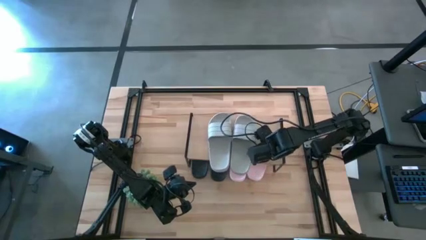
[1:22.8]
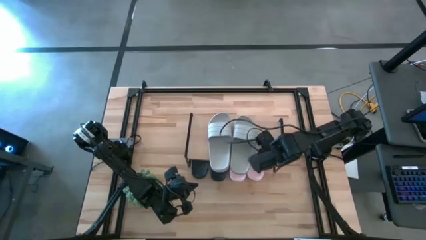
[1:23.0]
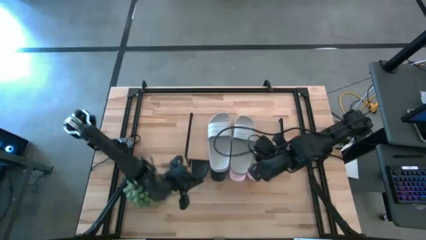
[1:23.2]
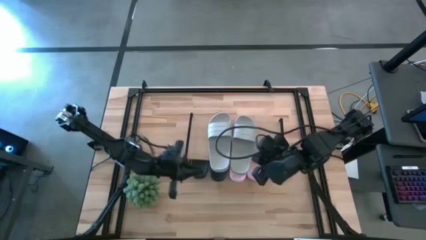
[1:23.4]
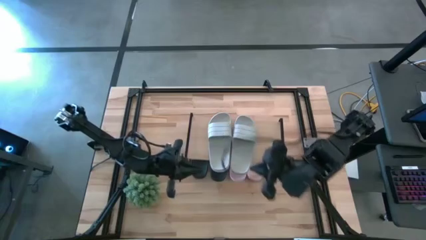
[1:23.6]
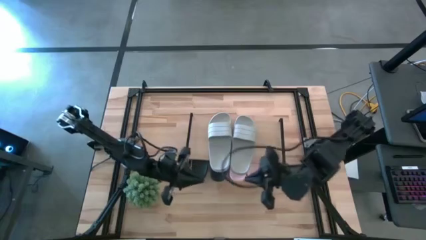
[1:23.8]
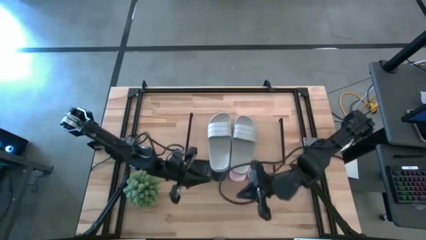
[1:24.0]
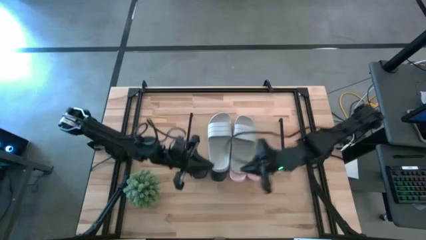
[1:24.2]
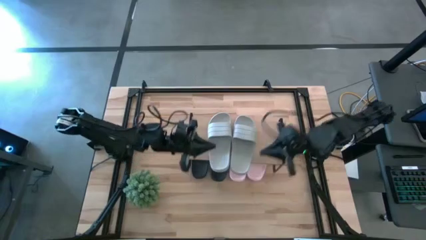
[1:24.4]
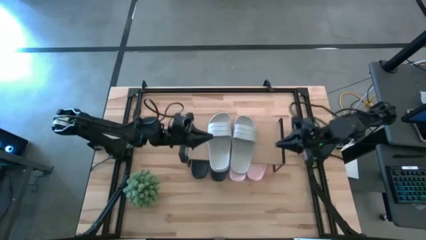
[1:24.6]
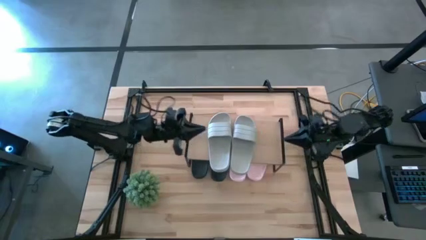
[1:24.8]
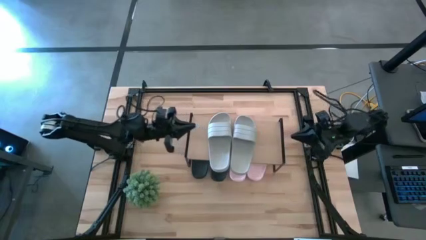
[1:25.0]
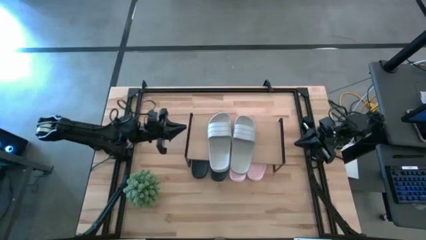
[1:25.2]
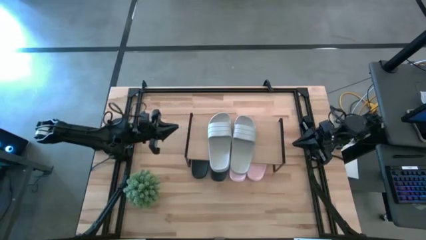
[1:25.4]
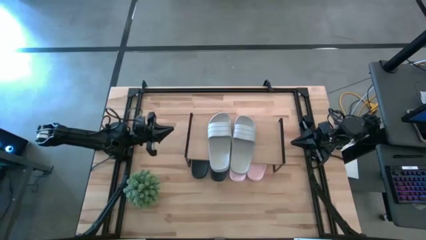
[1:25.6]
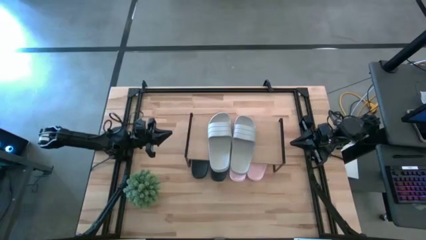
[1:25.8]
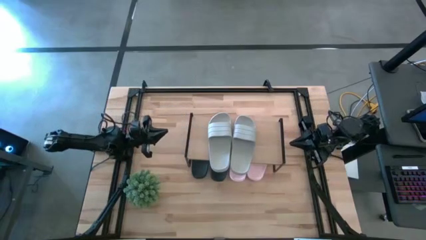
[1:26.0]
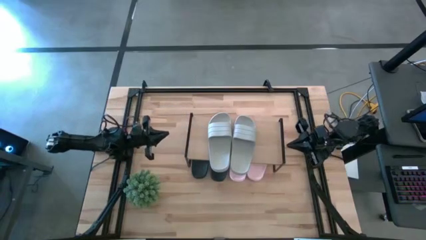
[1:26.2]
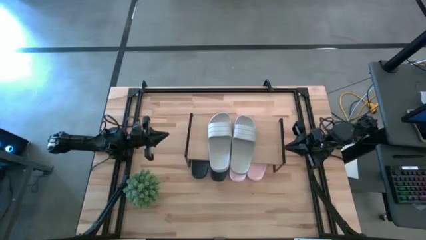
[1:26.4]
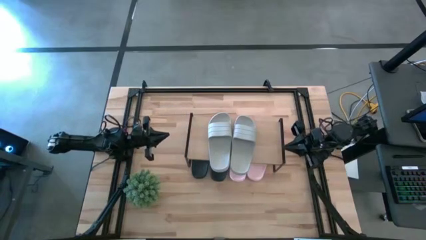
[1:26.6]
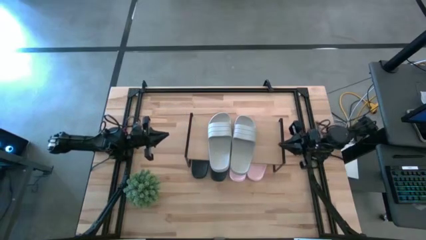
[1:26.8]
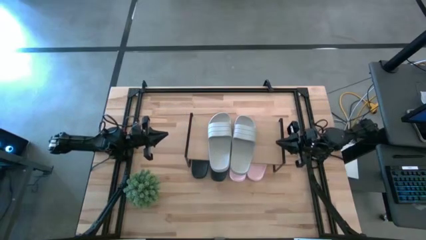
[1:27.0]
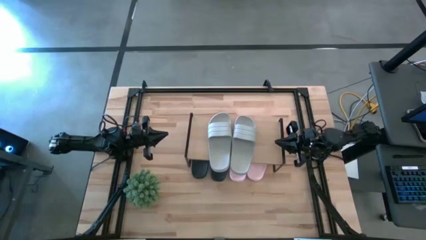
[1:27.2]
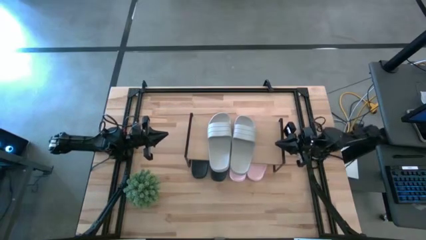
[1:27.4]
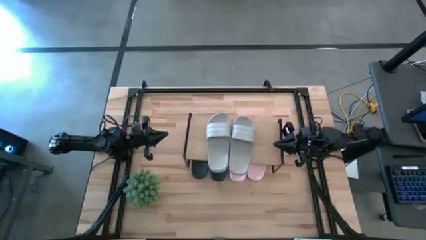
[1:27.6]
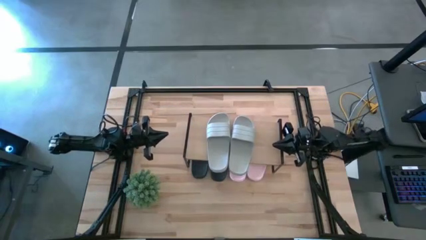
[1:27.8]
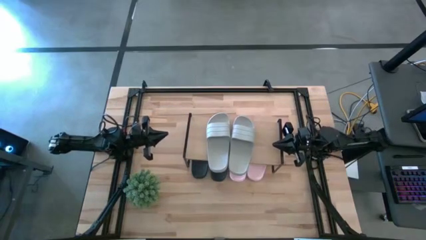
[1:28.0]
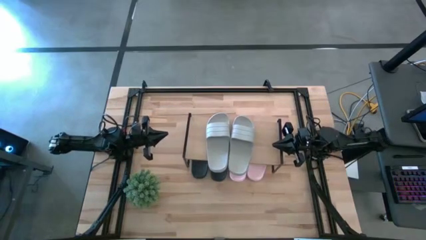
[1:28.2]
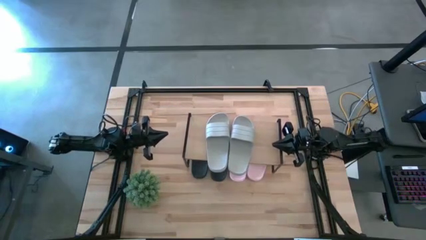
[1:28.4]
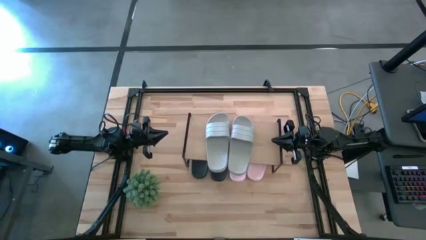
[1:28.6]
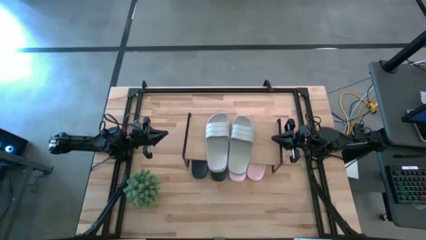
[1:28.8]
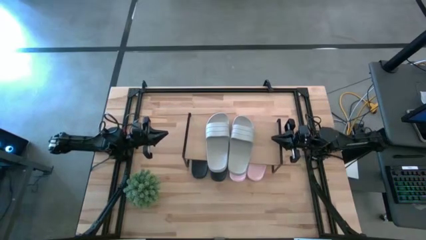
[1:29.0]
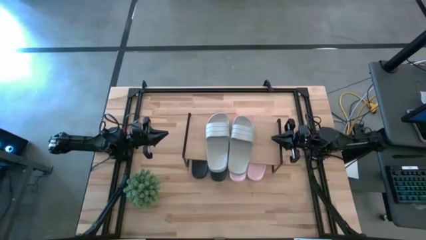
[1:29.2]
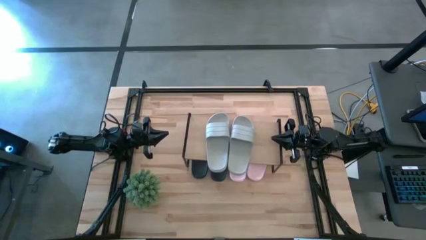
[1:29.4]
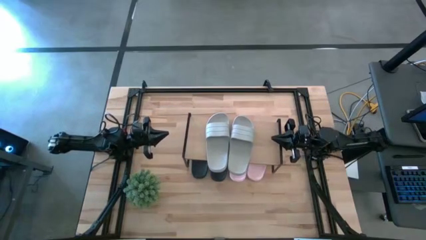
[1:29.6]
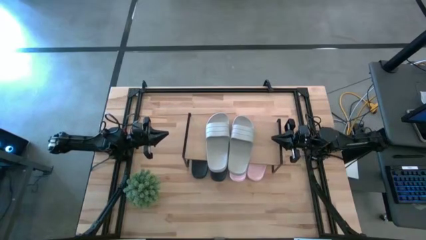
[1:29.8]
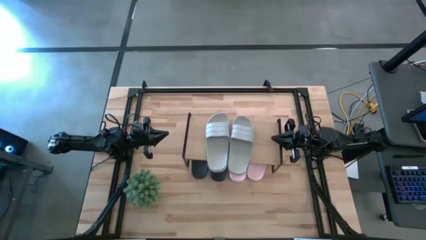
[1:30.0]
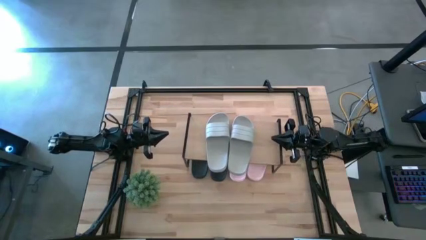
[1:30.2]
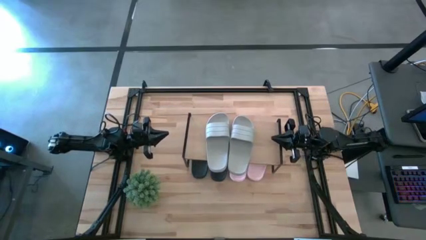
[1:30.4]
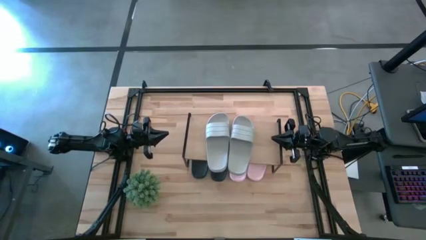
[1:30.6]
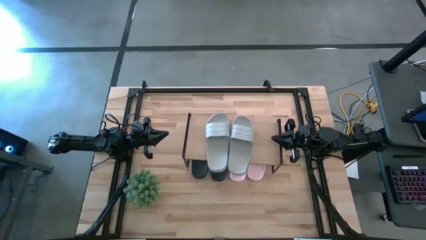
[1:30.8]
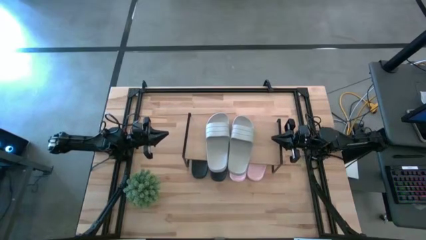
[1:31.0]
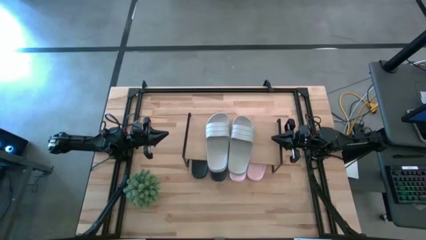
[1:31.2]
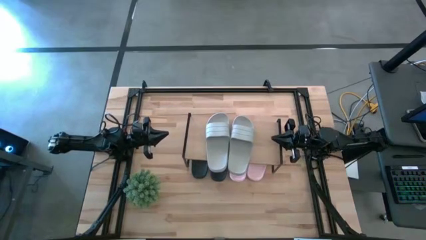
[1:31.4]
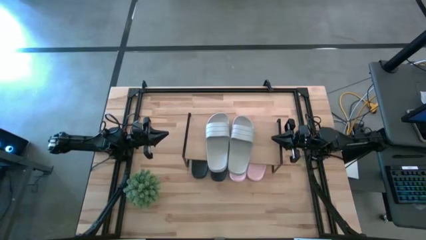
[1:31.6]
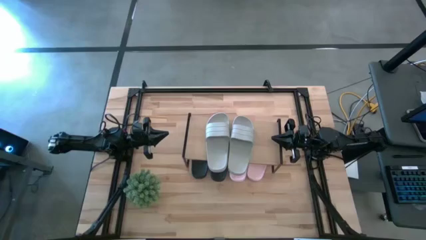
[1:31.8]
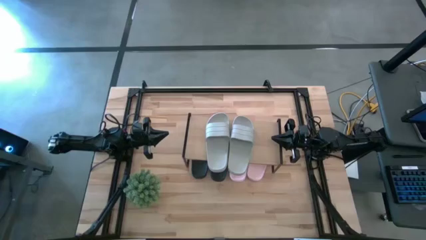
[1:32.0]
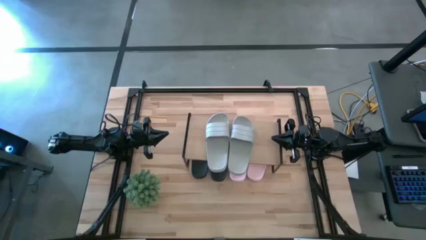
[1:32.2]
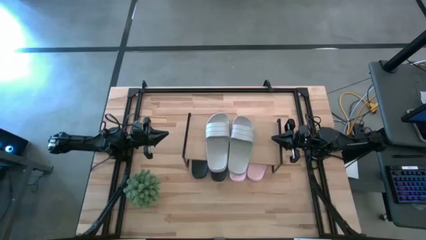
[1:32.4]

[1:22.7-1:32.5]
Task: Pick and place slides into the shelf
Return to Home Position

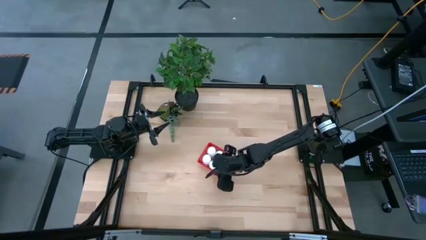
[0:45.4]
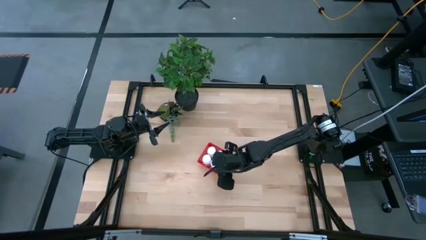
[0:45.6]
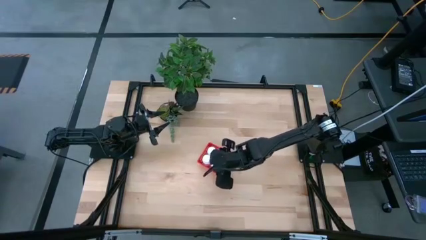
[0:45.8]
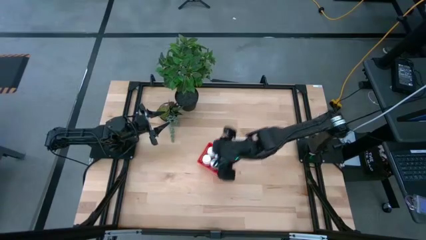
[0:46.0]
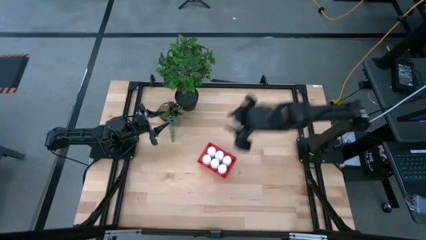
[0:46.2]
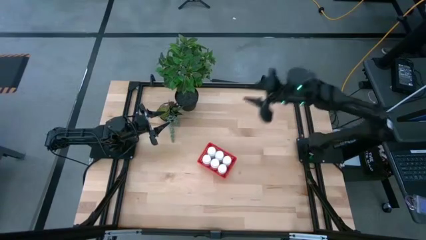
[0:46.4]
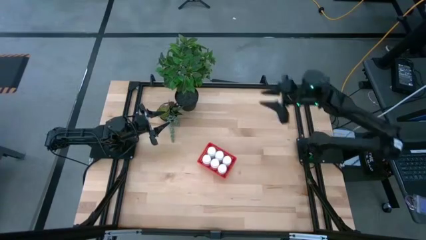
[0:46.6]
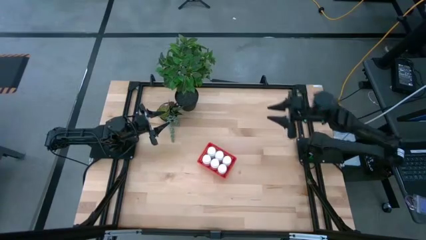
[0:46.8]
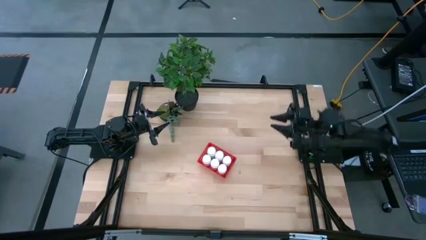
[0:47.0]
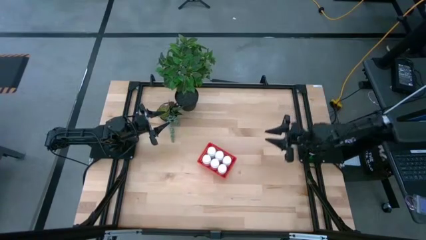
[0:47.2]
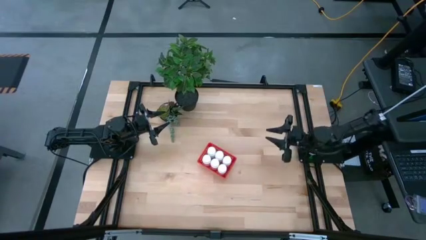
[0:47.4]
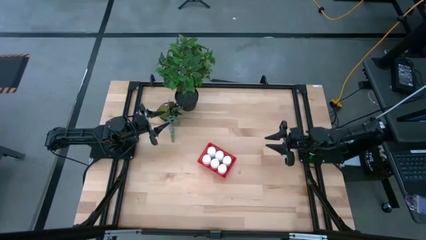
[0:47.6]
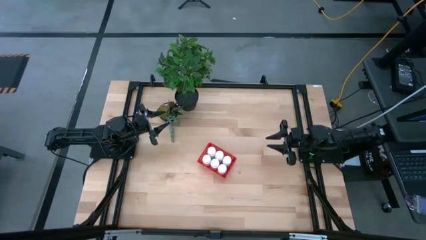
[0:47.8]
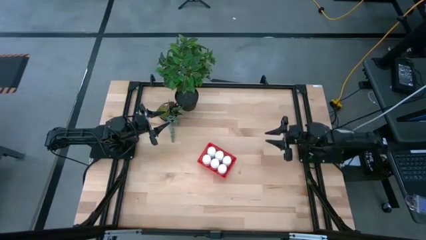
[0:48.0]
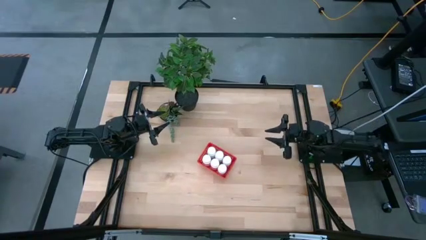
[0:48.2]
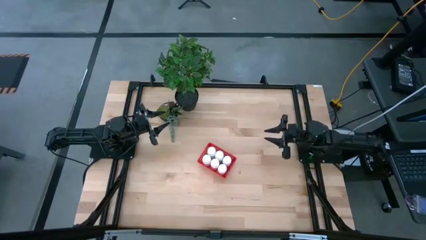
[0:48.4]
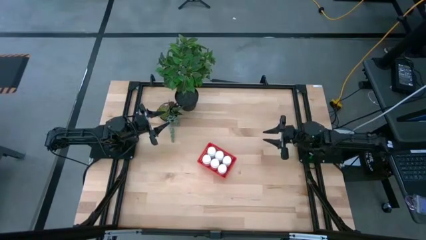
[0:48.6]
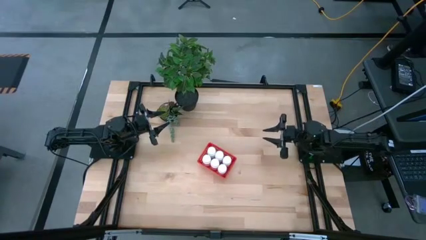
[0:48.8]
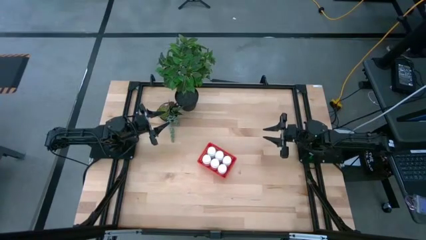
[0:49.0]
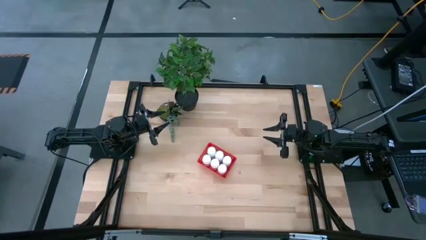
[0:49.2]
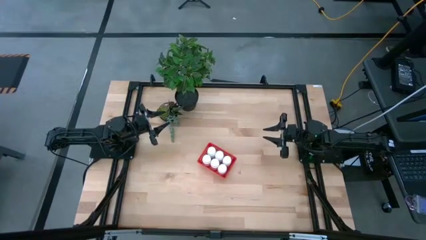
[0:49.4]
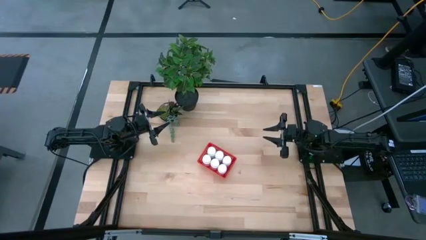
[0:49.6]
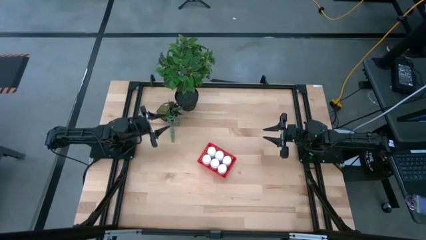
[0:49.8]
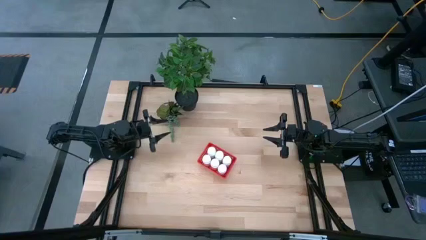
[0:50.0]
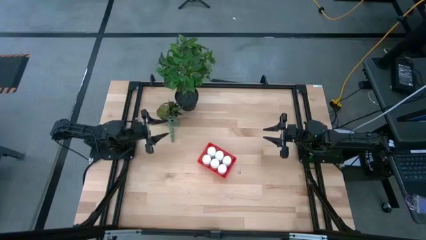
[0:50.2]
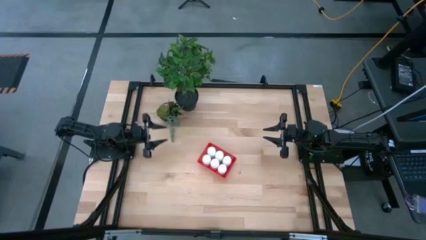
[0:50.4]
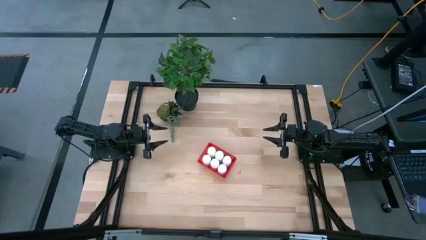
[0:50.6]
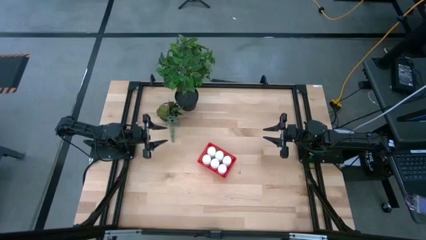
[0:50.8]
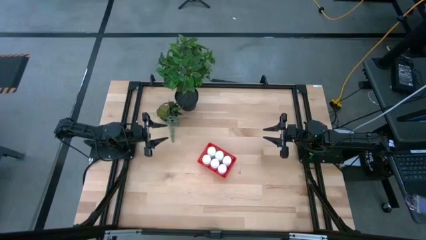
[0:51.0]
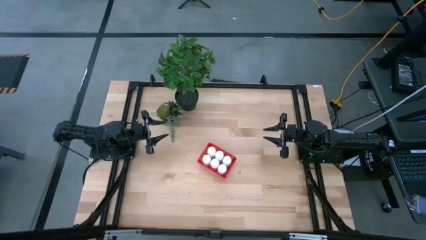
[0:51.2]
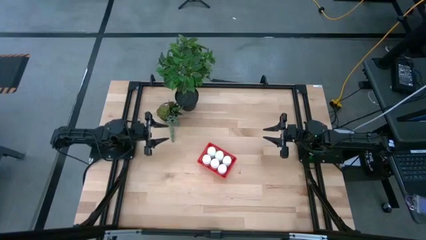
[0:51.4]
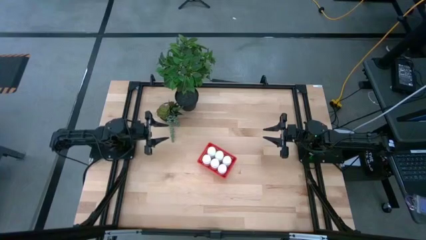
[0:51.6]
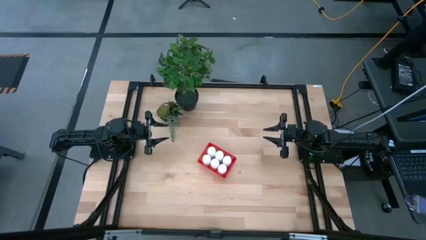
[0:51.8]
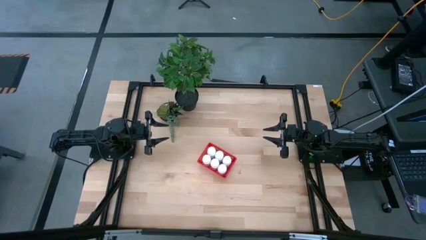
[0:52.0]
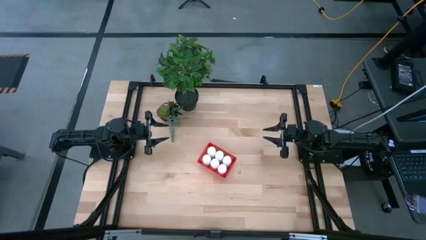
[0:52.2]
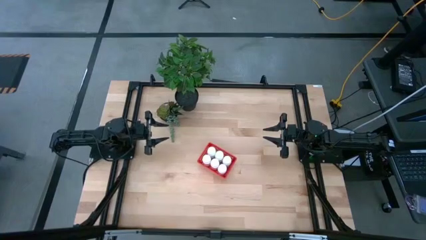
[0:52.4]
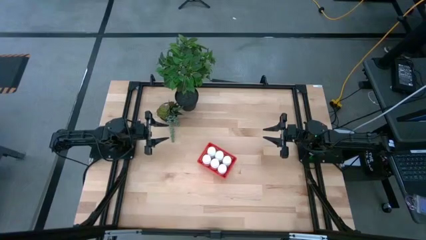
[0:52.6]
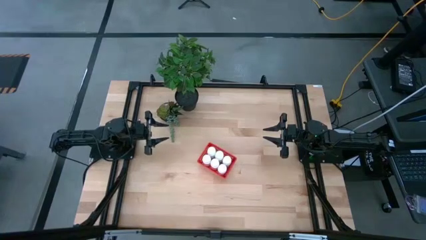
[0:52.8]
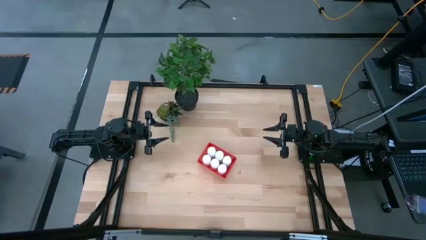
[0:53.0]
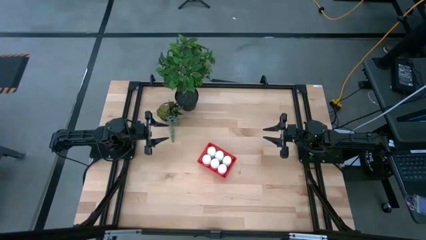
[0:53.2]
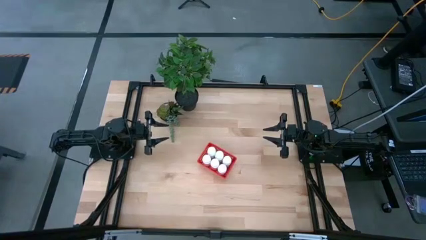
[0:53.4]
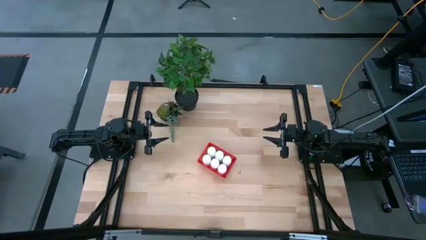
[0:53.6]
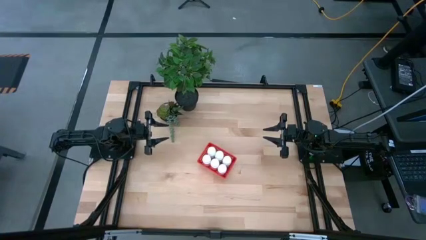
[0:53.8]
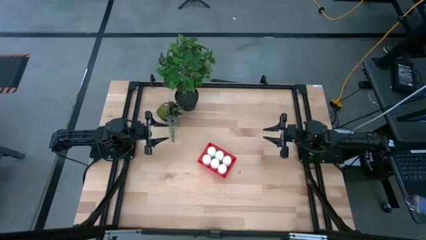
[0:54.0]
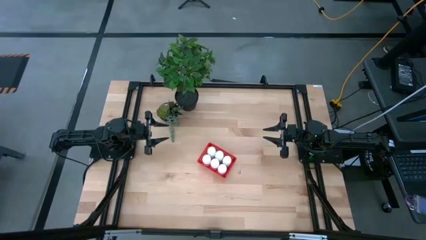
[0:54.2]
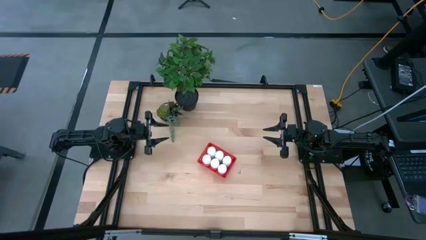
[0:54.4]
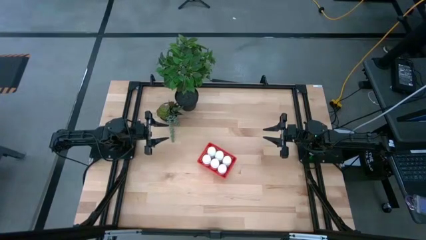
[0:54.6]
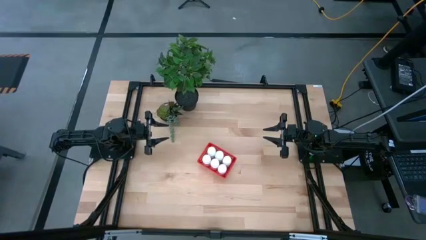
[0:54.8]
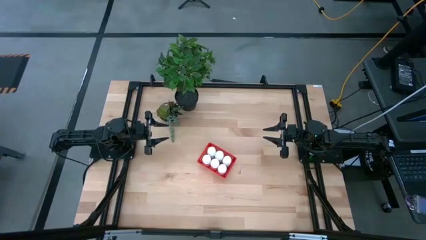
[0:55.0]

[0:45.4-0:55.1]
Task: Pick and place pill bottles into a basket
Return to Home Position
